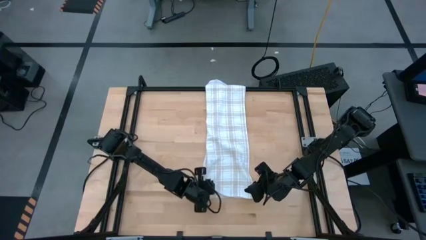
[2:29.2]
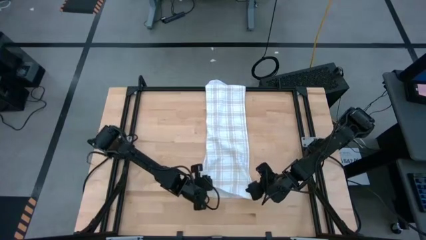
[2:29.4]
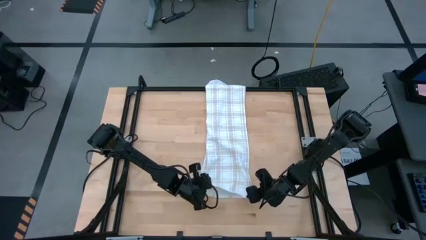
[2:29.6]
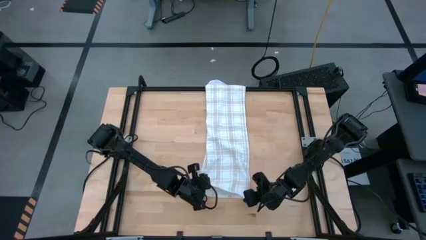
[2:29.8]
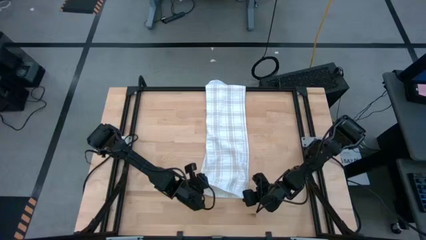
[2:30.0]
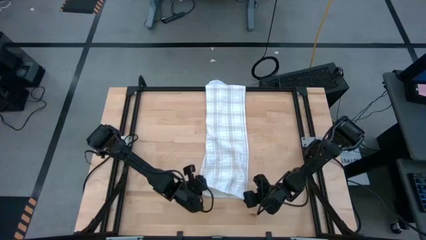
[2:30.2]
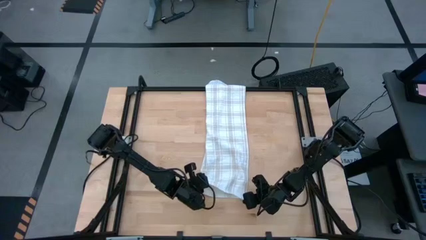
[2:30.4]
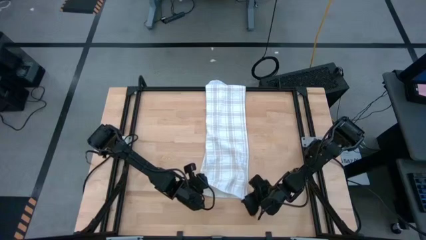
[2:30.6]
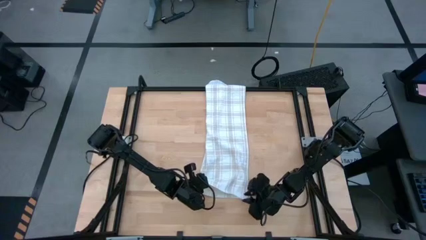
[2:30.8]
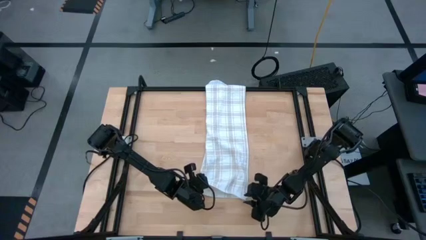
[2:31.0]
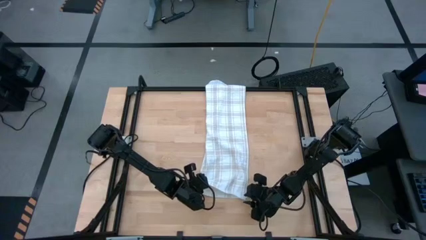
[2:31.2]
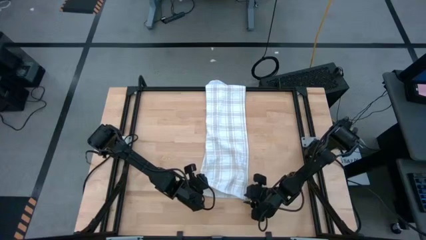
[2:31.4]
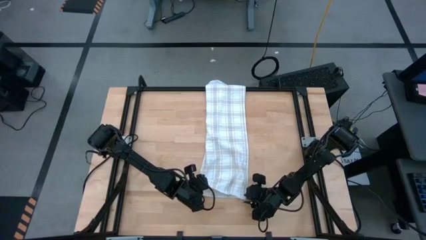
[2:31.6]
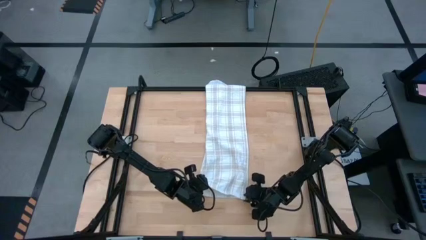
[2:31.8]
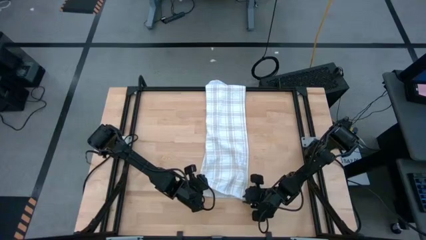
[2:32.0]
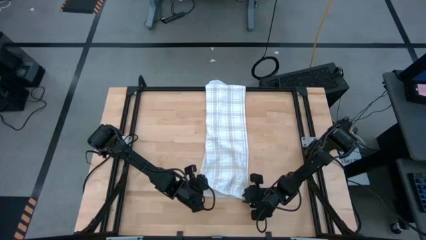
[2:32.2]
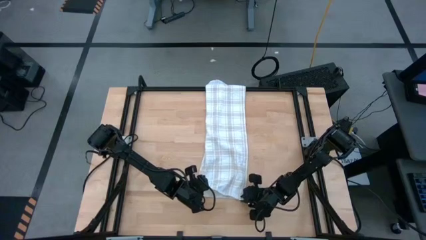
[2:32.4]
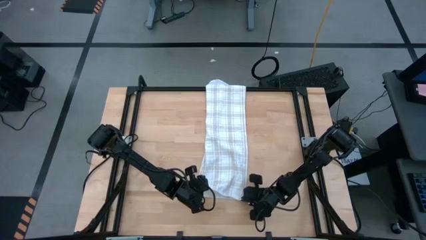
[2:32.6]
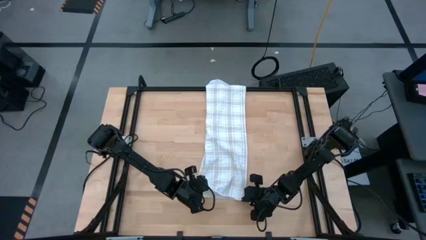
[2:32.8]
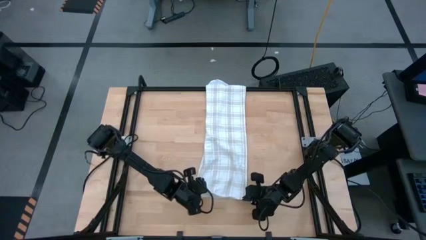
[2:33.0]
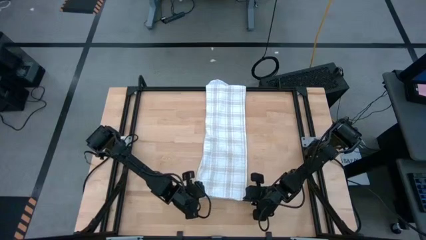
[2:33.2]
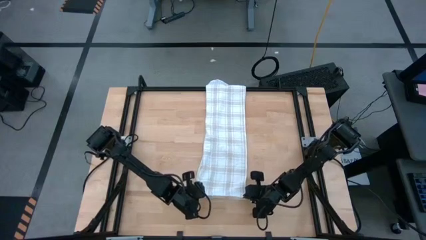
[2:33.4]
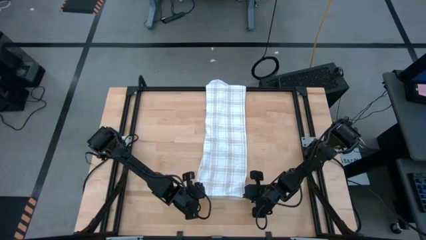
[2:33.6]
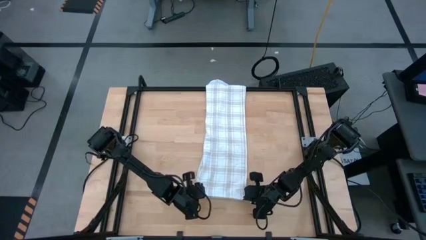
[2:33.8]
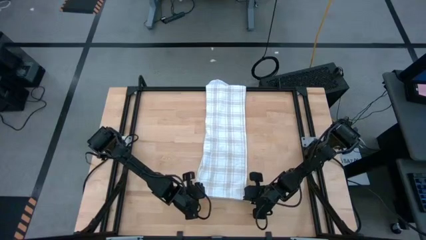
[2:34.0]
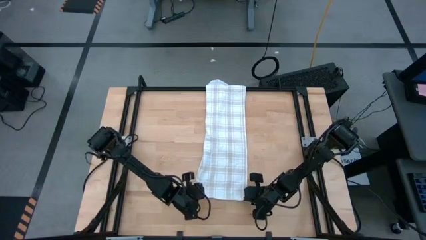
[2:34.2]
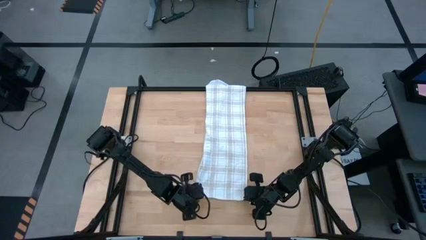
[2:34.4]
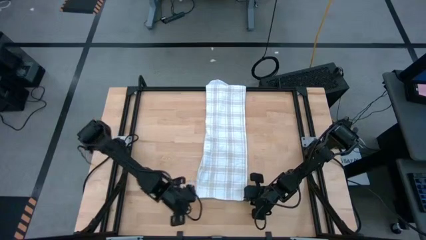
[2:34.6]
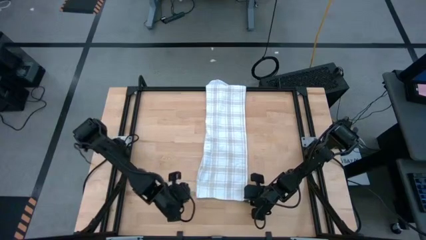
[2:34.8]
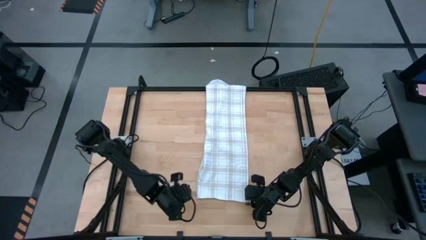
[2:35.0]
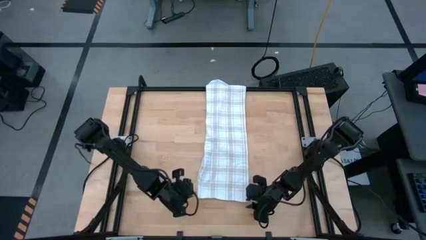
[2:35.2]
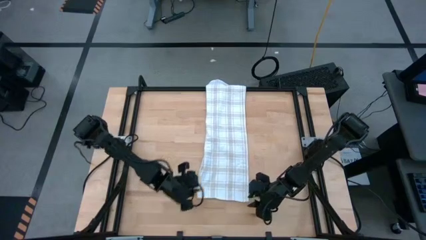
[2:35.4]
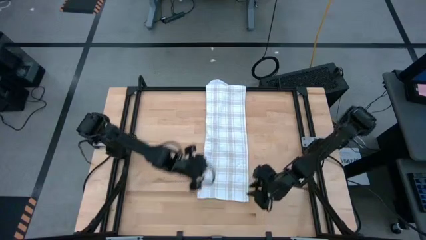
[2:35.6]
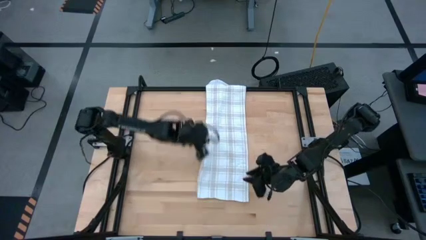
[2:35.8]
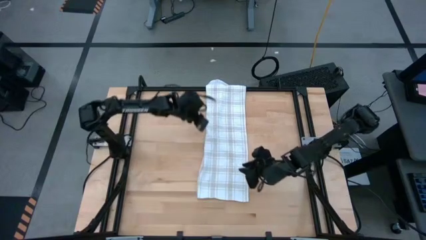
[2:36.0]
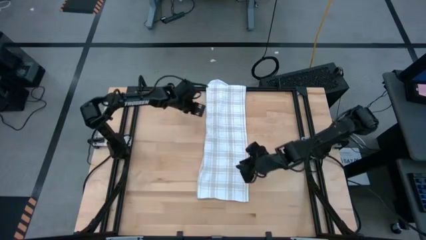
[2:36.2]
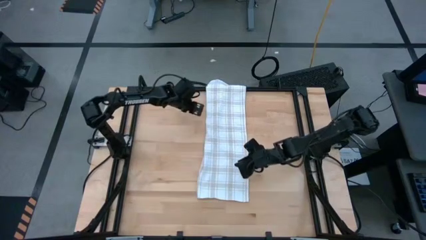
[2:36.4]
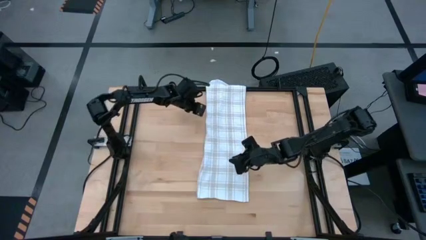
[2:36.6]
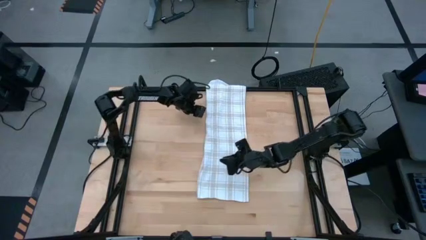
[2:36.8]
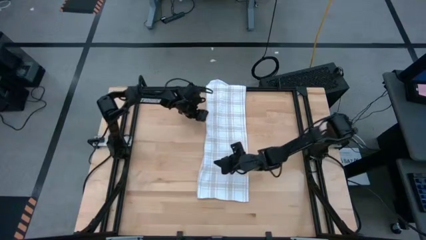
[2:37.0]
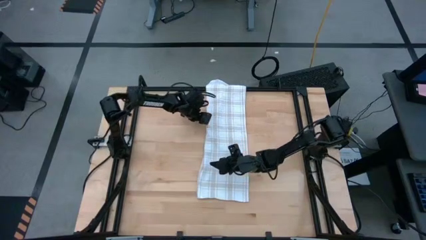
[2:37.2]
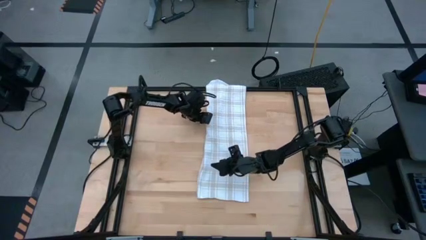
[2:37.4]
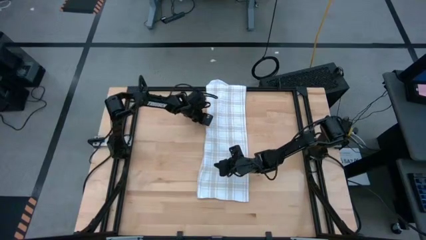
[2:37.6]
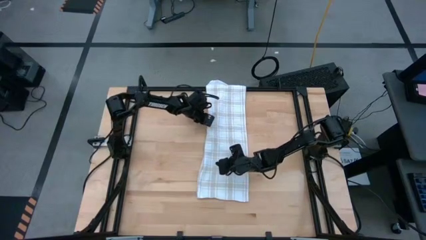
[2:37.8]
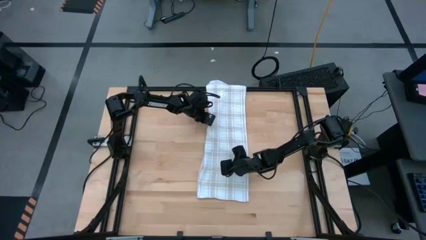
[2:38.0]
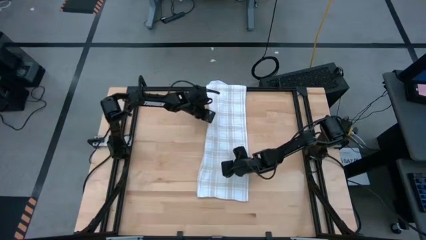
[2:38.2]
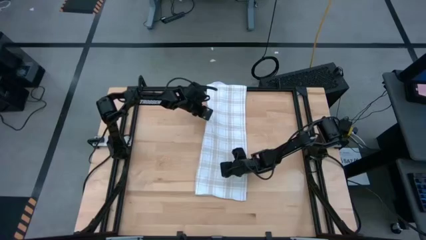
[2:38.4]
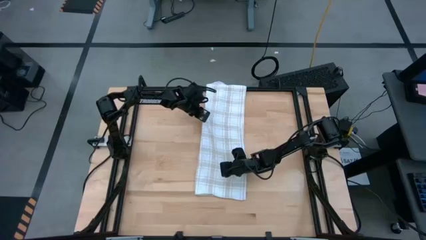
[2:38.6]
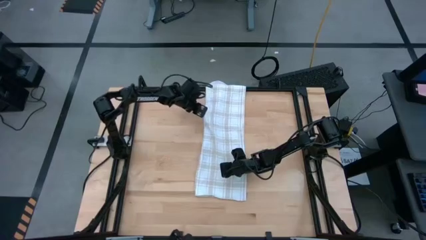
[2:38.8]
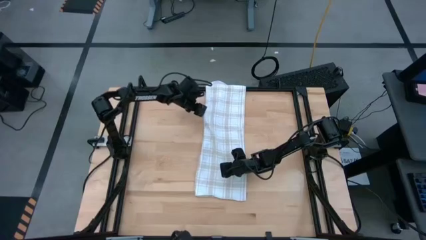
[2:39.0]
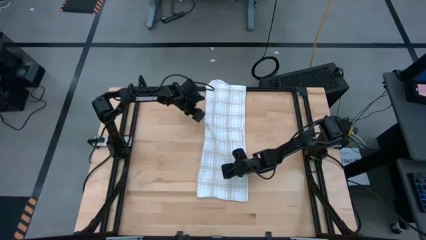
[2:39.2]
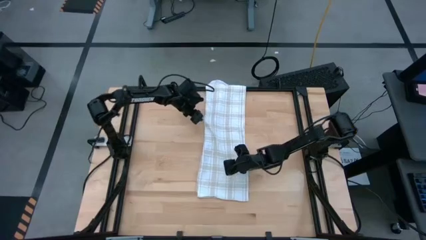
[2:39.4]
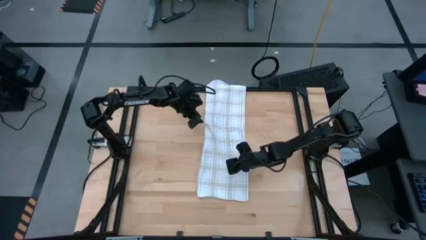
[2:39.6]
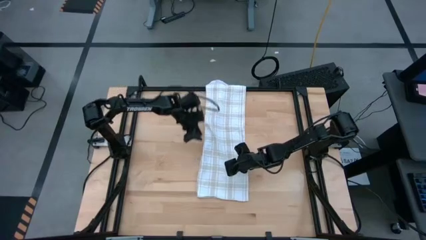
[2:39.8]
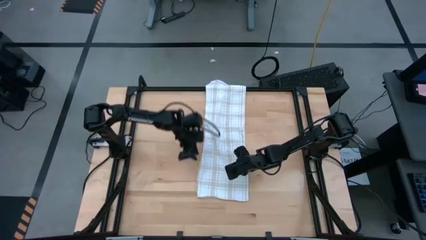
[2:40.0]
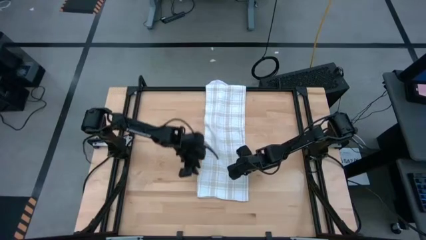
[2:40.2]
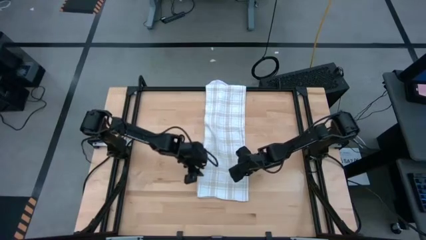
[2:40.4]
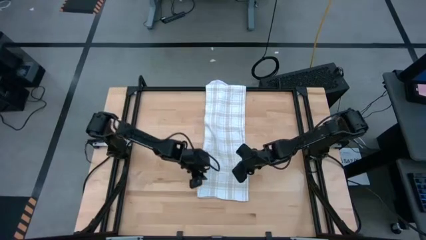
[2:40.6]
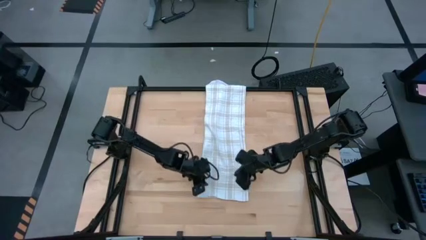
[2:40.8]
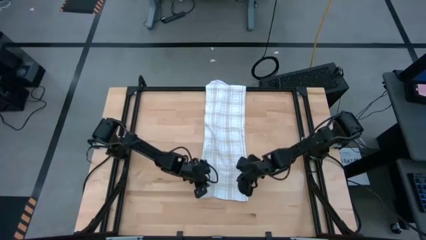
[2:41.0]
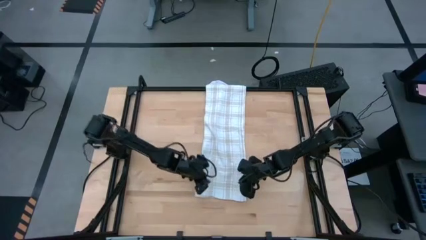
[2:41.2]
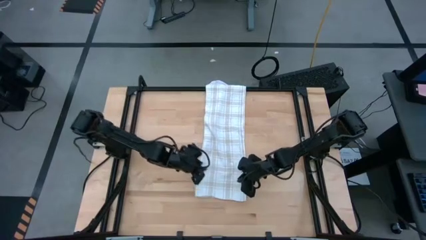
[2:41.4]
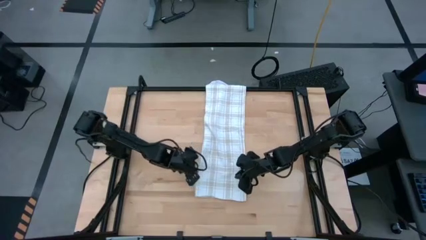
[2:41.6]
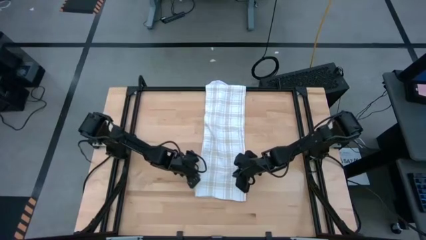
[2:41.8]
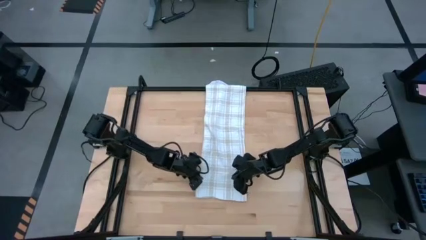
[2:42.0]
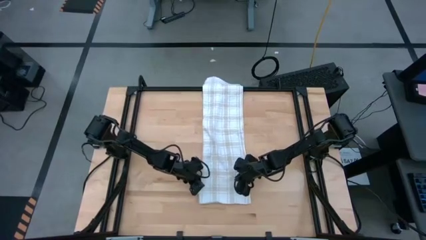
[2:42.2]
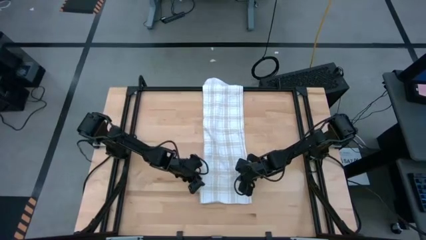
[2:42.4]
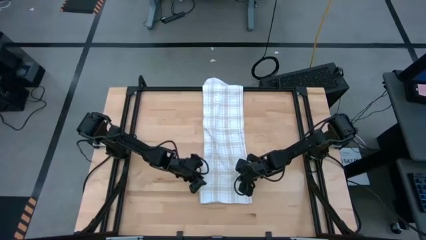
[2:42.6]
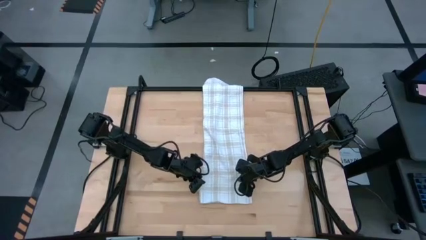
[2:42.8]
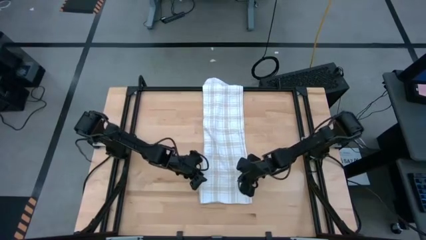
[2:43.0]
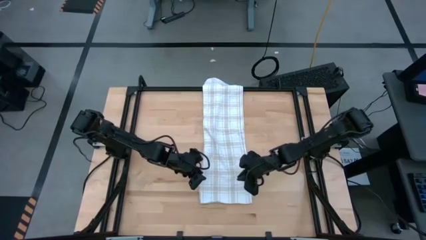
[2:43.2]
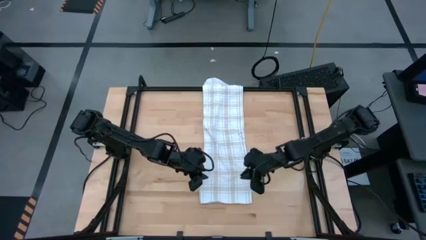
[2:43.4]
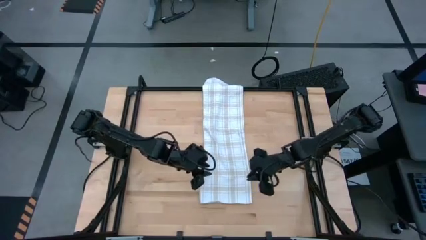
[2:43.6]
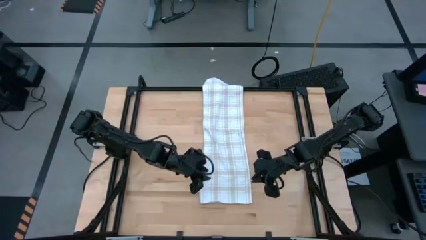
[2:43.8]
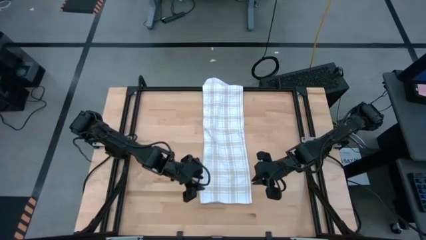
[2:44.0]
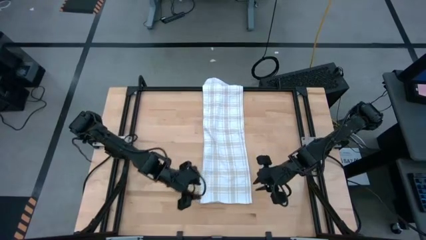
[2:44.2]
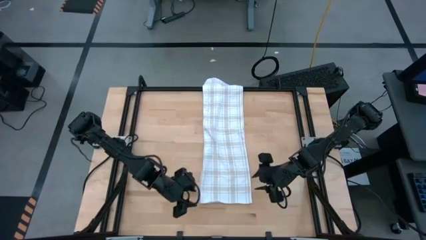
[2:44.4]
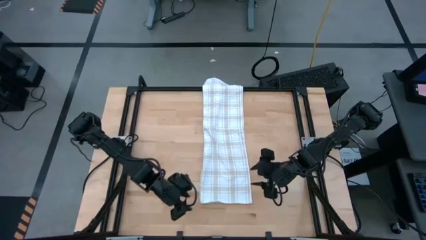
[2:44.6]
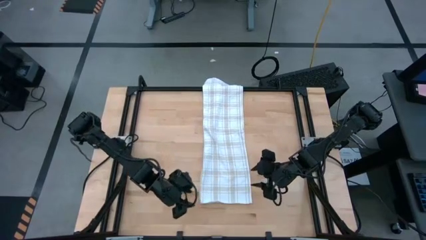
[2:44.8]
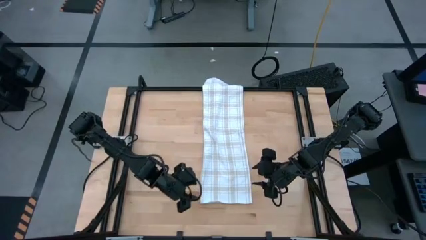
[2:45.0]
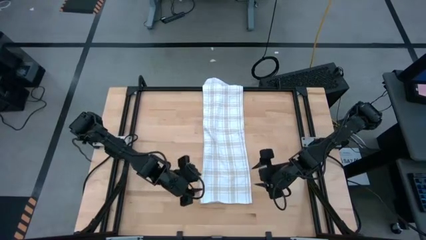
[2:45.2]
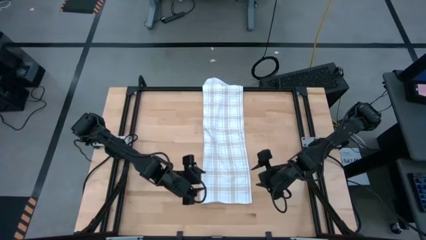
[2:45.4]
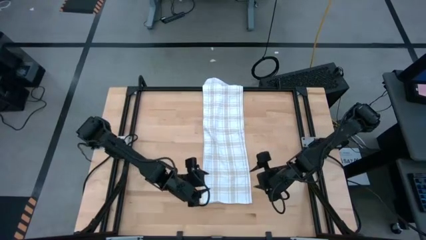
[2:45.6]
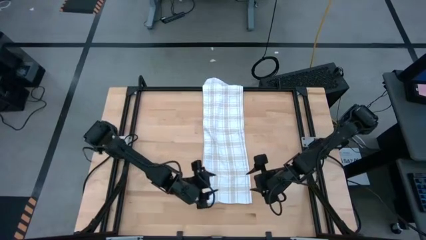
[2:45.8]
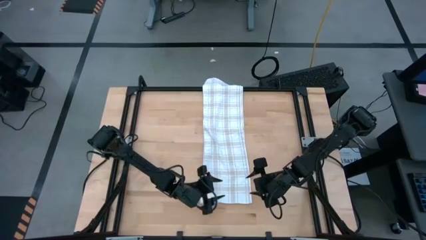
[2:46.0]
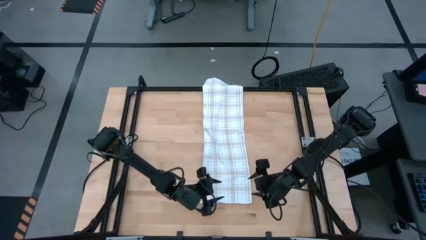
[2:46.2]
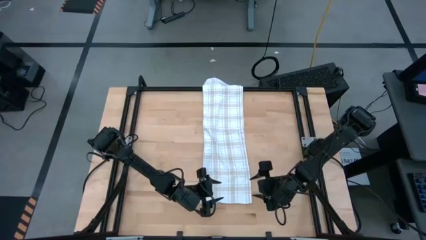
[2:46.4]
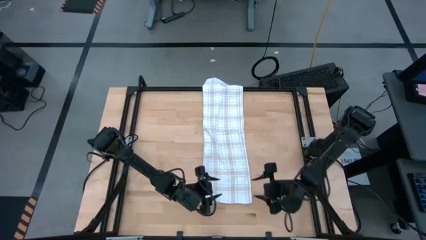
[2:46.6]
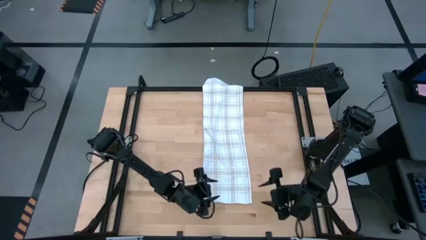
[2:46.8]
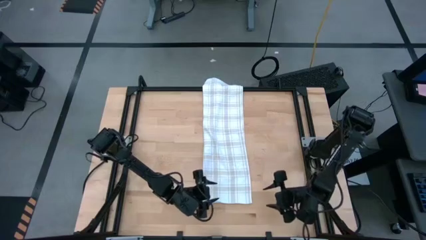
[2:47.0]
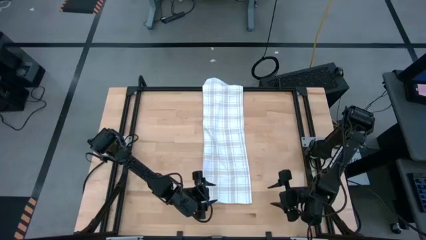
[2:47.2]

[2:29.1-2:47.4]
Task: Roll towel into tight, uniform cylinder
Roll the white towel
